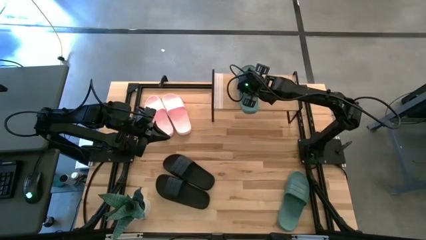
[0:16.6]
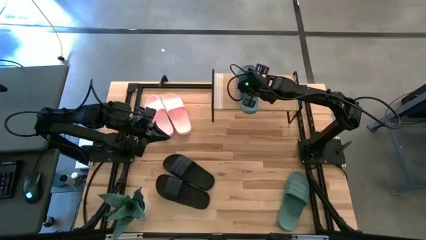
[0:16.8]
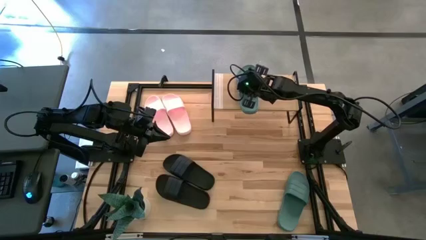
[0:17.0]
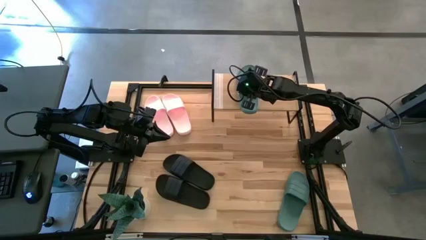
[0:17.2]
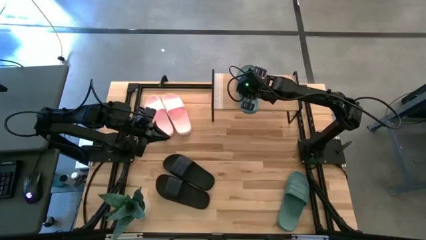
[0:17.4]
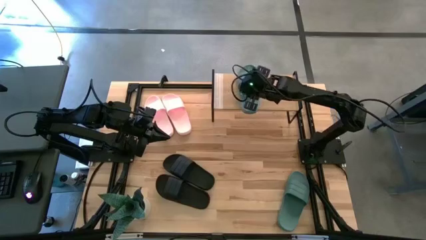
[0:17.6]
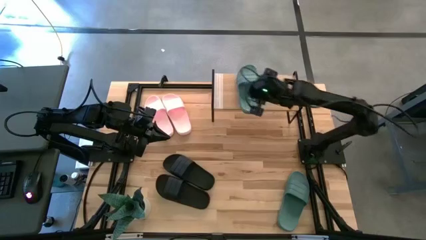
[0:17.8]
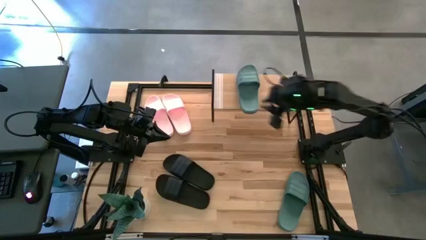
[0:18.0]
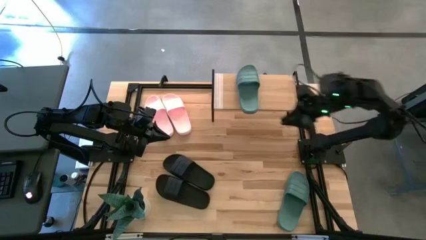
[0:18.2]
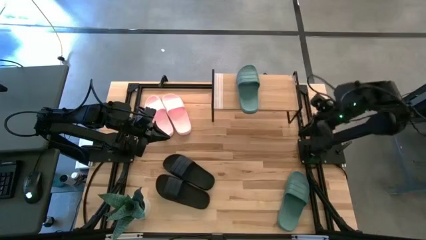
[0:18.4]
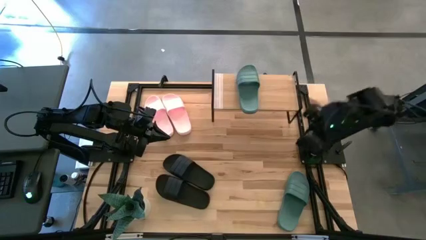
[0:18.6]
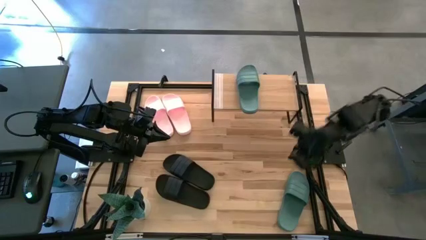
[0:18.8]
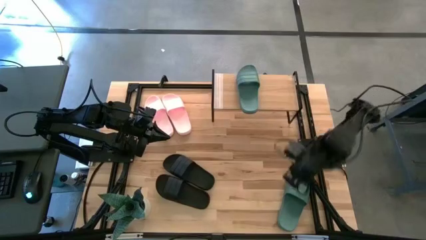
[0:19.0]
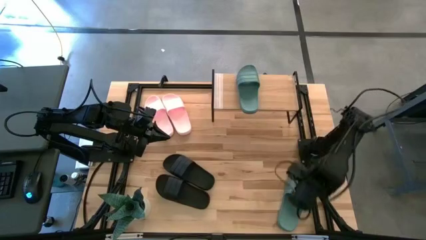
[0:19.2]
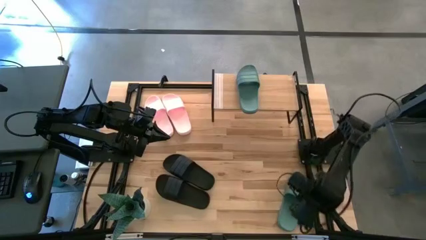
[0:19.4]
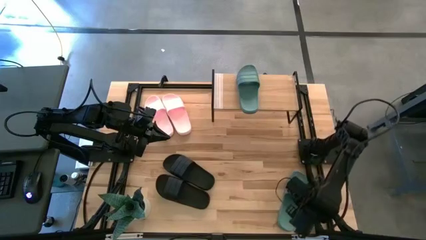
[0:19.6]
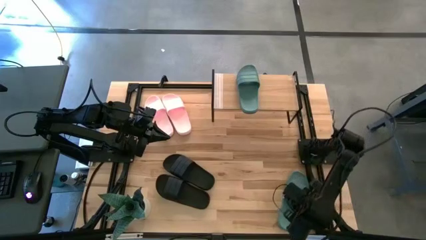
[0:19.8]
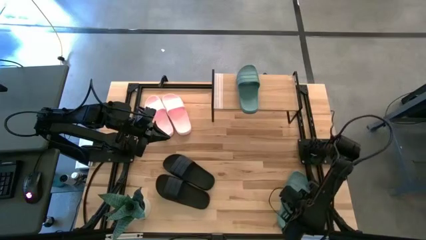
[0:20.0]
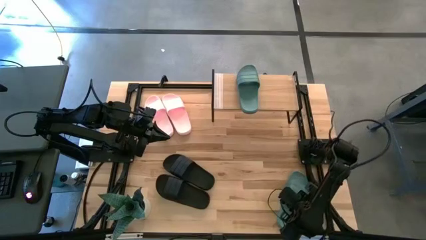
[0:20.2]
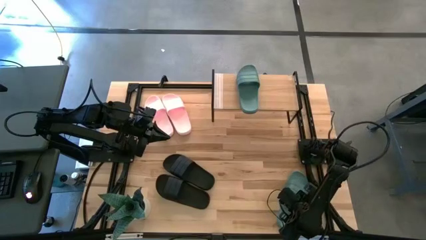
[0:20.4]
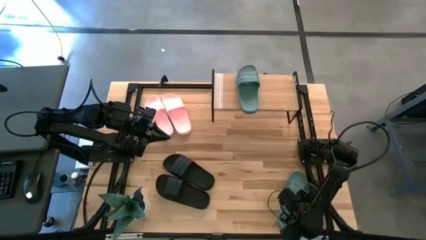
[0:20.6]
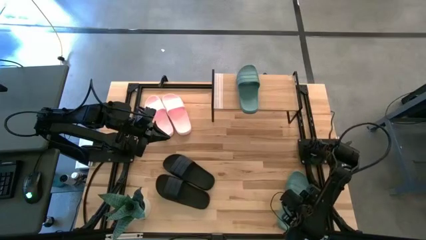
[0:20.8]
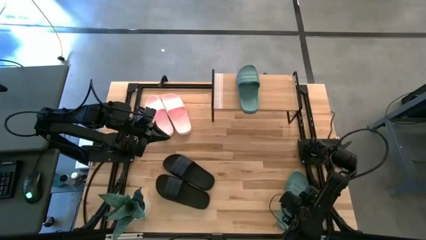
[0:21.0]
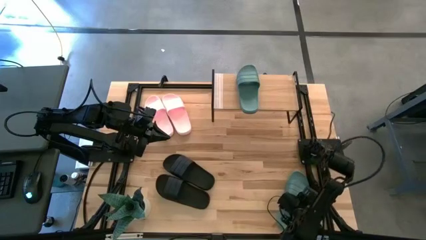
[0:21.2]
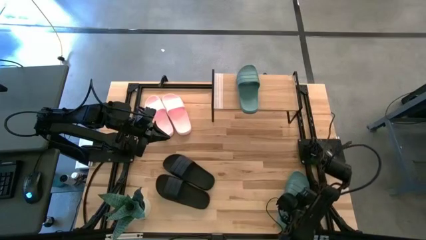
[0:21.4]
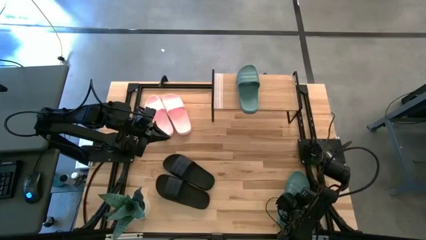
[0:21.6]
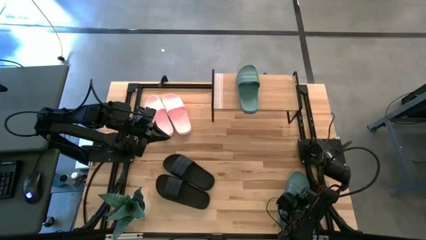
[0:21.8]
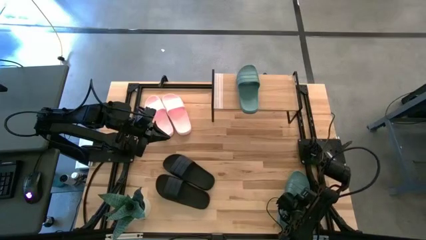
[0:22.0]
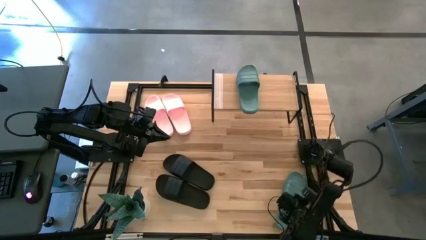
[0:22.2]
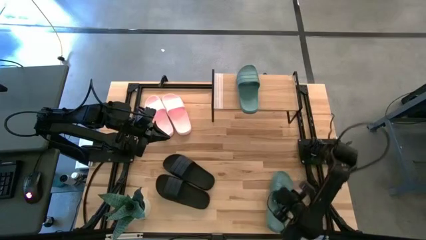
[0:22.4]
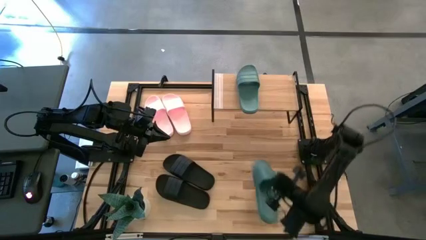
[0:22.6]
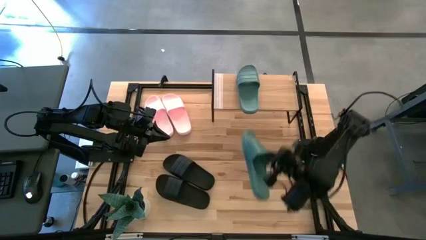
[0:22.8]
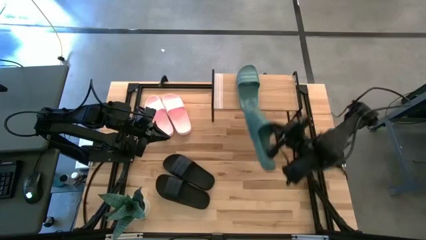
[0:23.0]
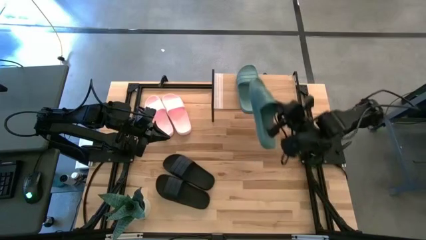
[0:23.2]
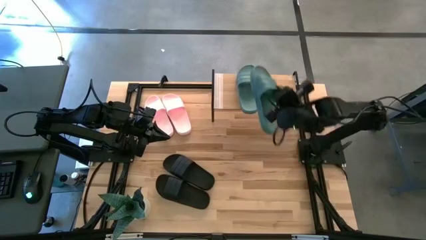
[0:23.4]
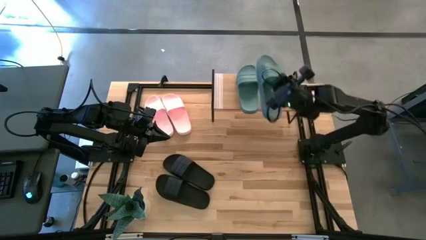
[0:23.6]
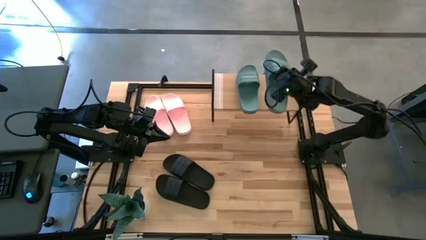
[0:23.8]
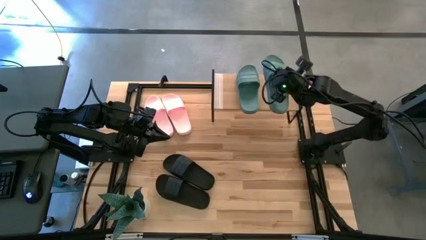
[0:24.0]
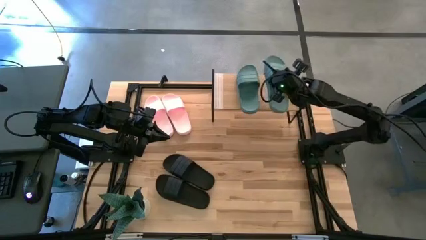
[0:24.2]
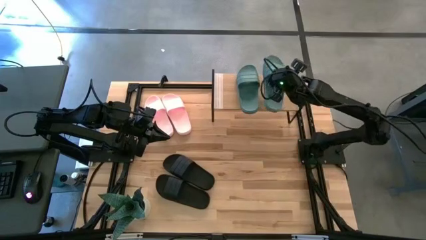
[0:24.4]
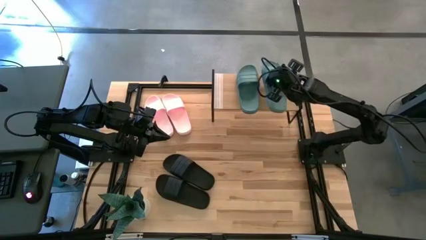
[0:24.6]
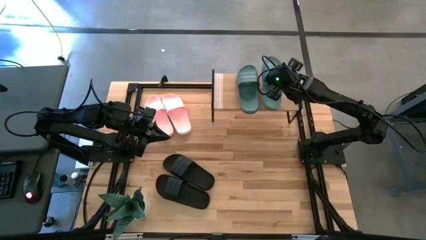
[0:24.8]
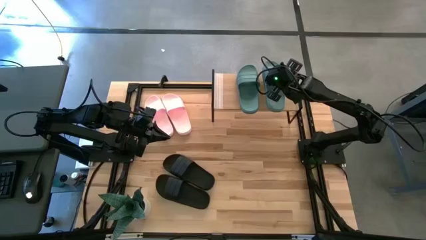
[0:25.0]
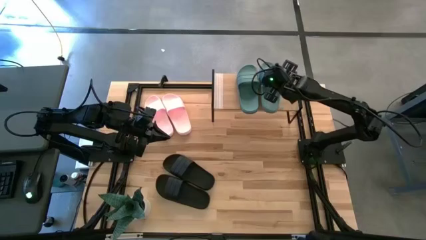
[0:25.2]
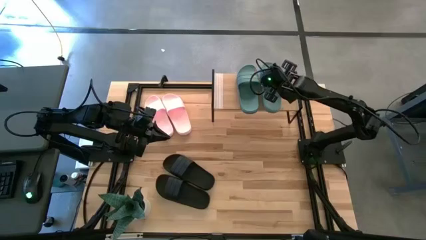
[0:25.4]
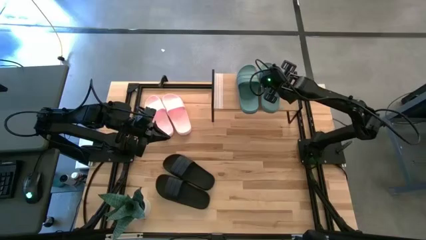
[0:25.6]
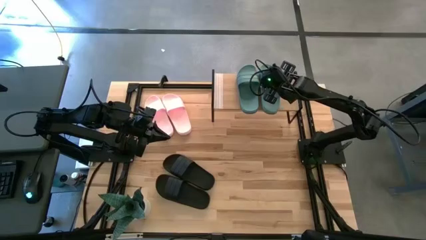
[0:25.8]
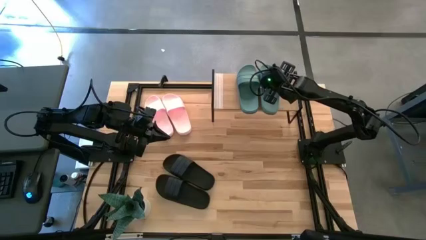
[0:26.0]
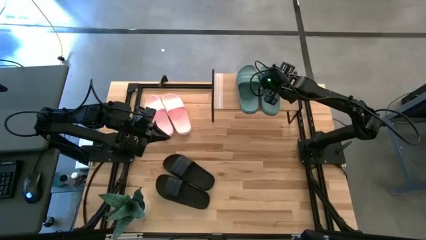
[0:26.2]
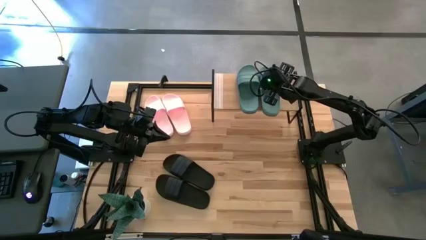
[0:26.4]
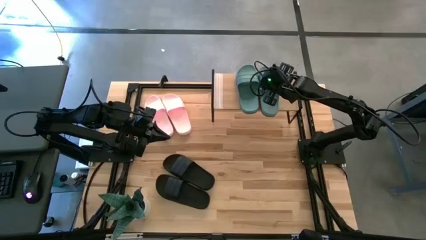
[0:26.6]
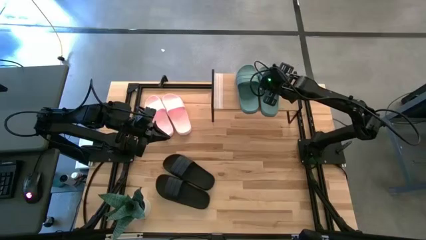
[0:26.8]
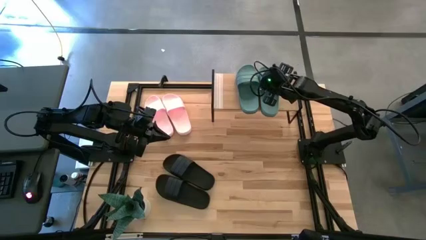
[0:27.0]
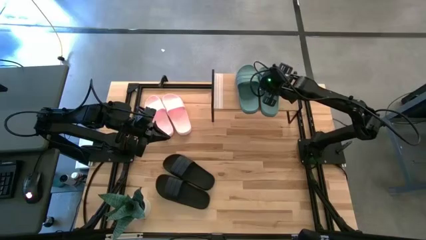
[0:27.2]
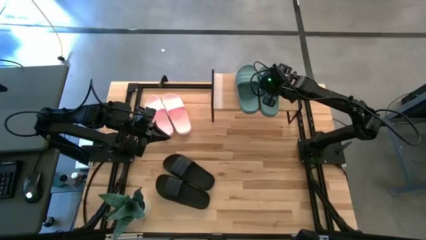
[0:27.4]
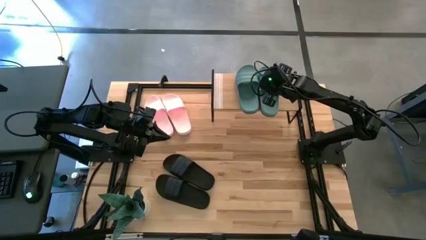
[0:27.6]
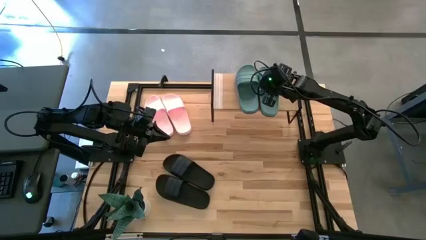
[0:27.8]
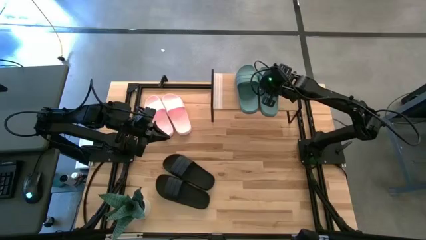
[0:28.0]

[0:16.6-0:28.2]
Task: Pick and place slides into the shelf
Put the green slide on to the shelf
